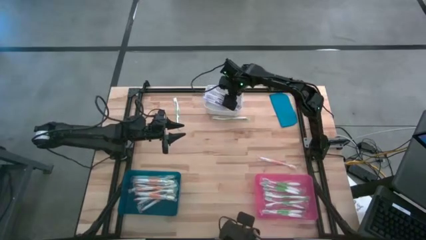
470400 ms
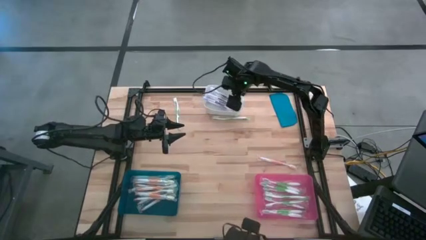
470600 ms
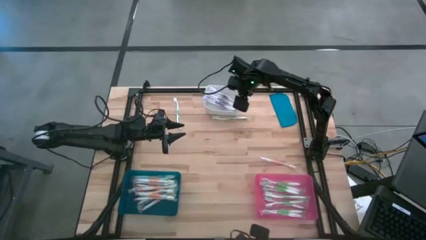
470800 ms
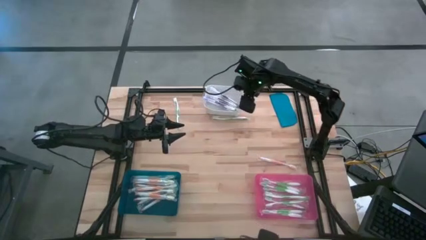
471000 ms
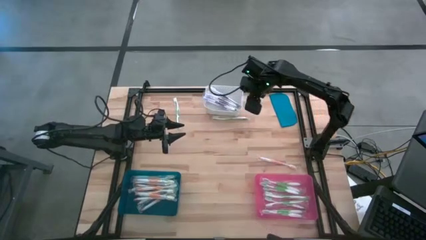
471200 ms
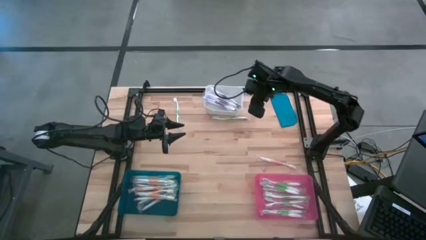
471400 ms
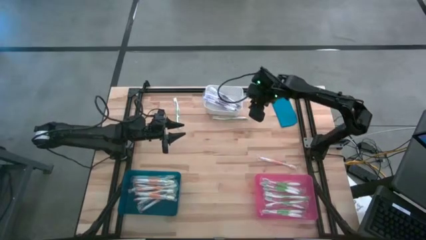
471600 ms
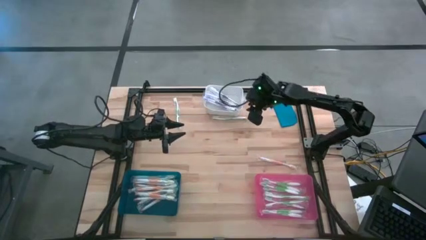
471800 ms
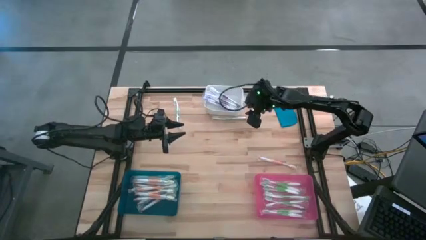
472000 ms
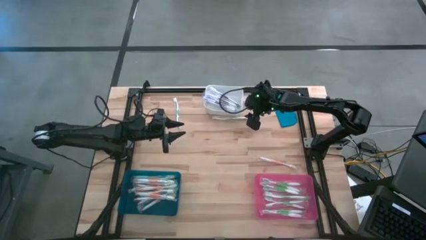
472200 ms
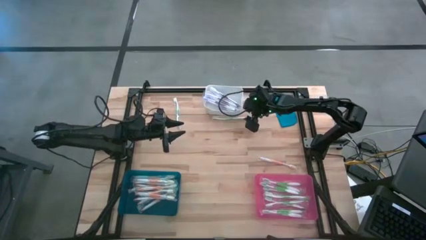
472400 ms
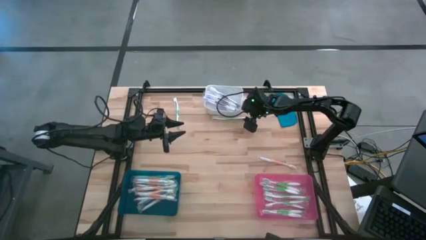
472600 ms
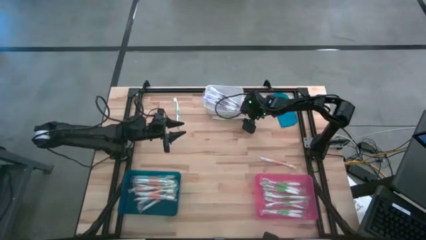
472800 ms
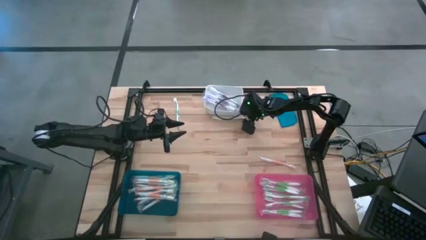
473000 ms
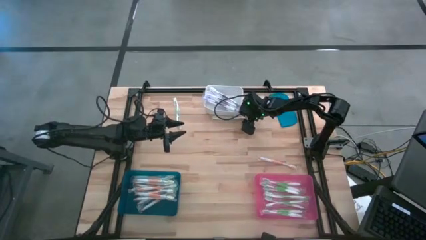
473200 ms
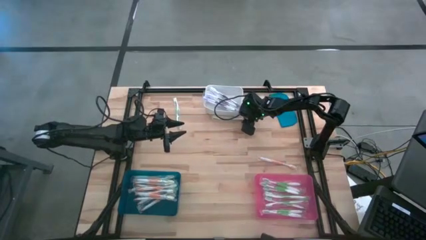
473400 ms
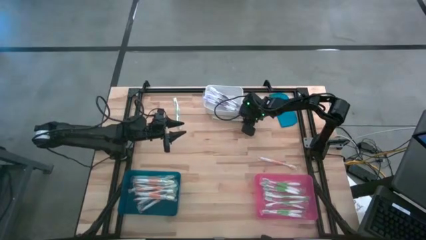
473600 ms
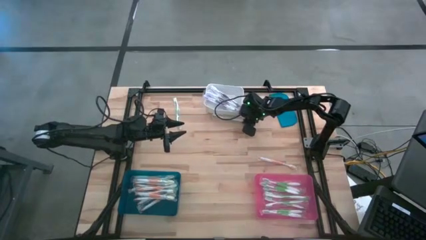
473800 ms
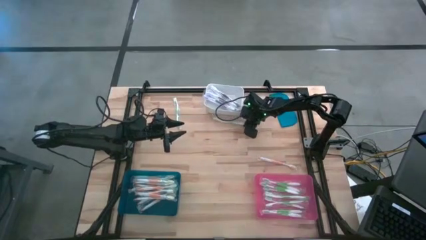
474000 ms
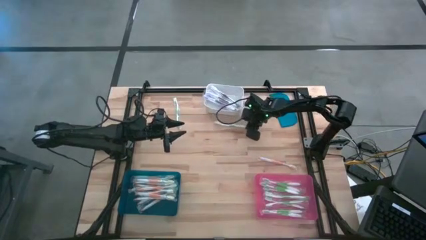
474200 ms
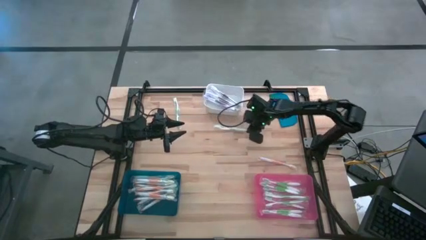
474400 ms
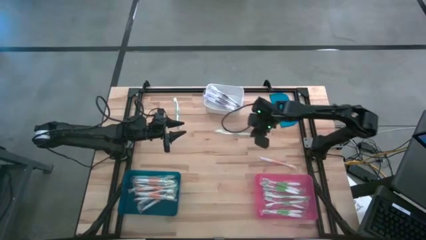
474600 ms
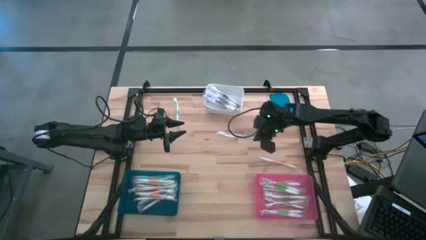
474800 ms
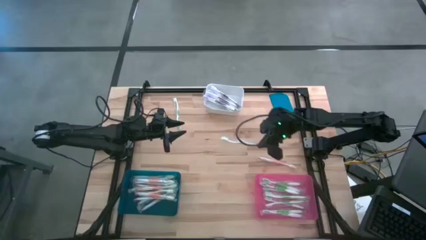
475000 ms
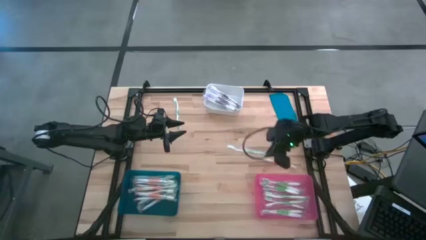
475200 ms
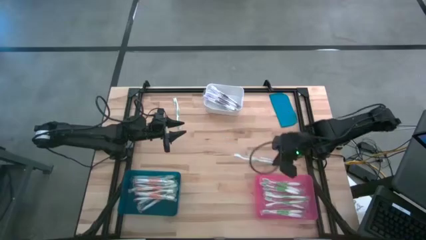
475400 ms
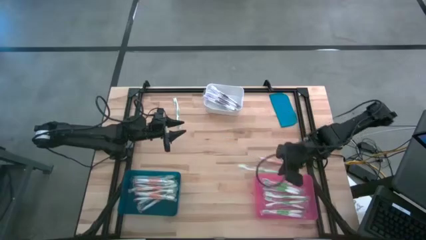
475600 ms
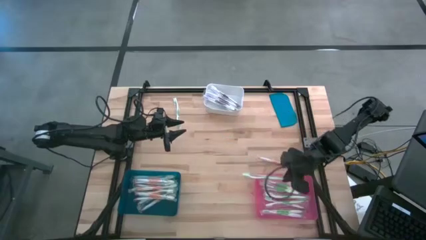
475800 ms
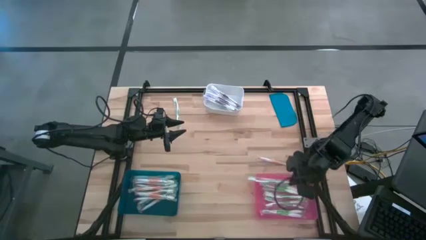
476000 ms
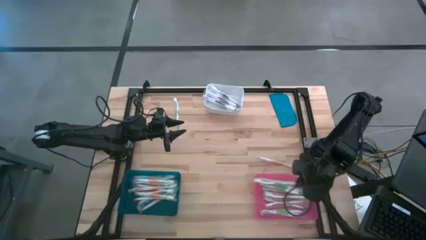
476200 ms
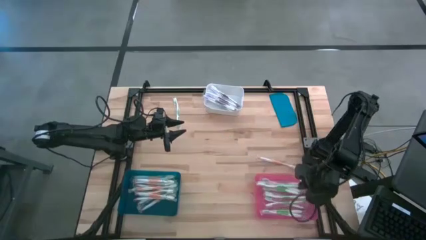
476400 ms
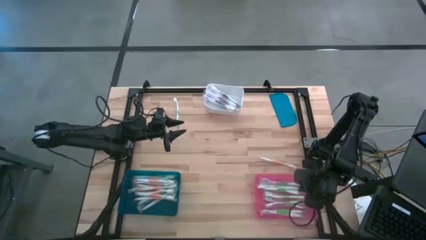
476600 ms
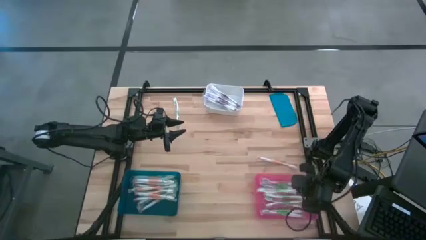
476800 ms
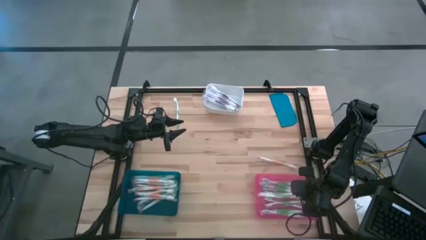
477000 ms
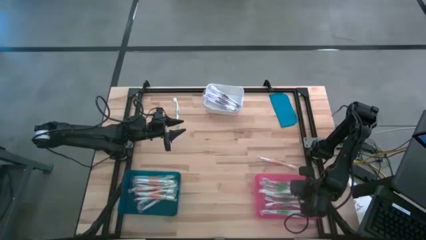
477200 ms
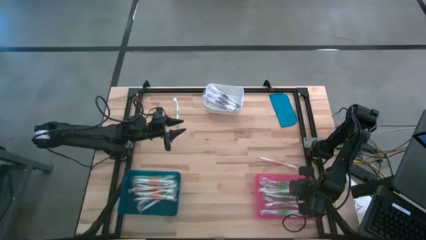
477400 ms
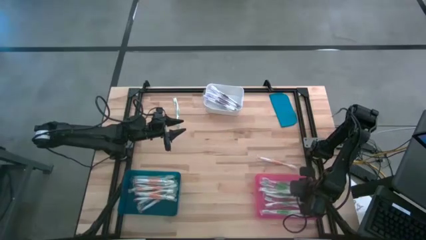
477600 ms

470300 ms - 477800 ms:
Task: Pick & Place Toothbrushes
Put the green toothbrush into the pink bin
